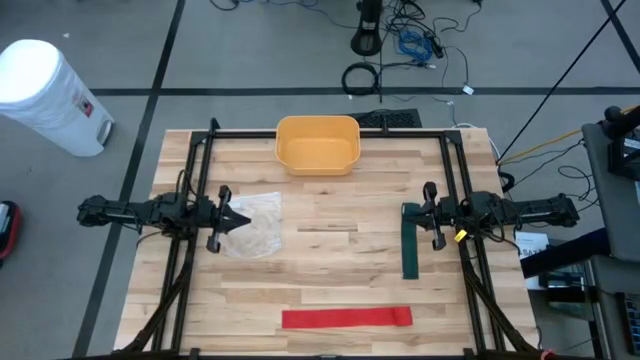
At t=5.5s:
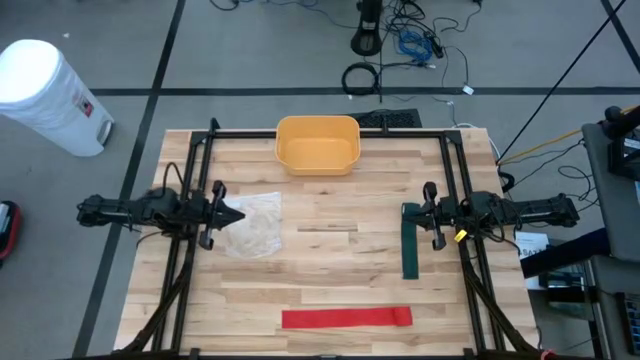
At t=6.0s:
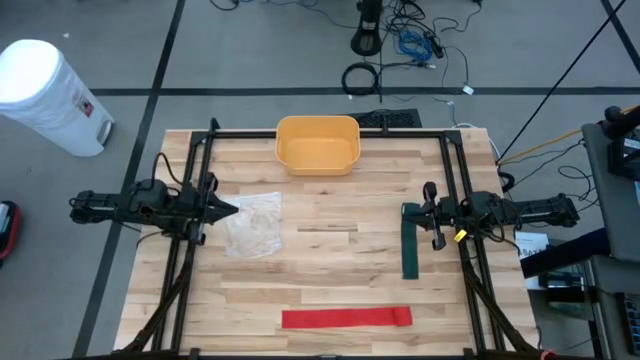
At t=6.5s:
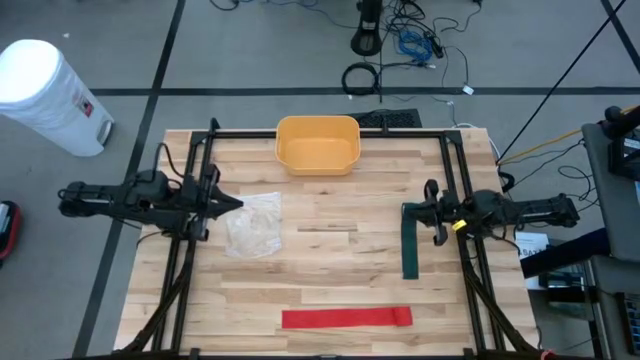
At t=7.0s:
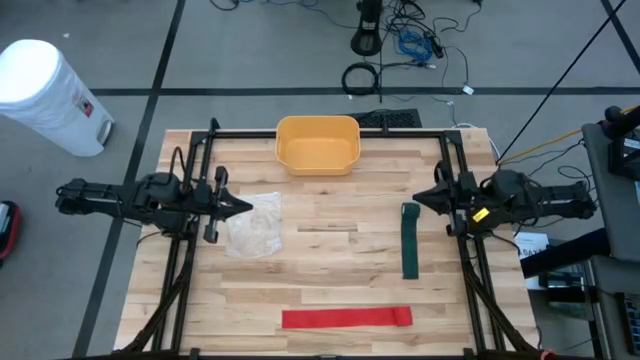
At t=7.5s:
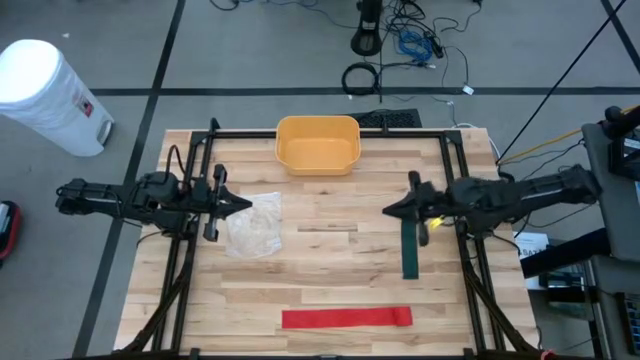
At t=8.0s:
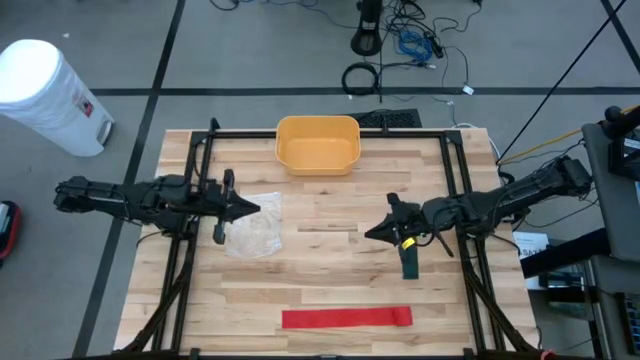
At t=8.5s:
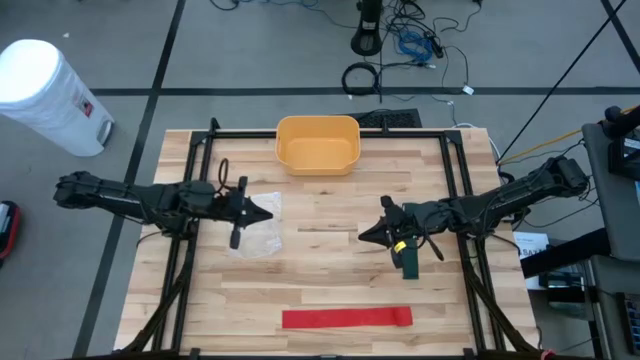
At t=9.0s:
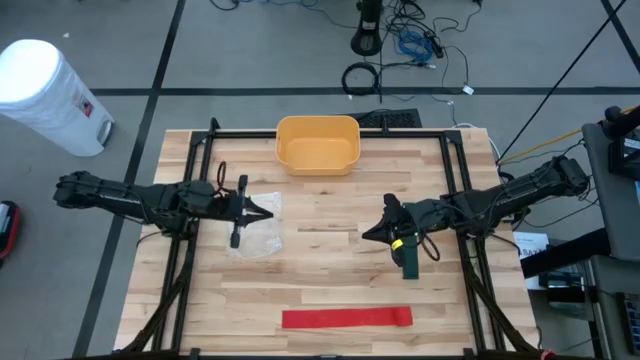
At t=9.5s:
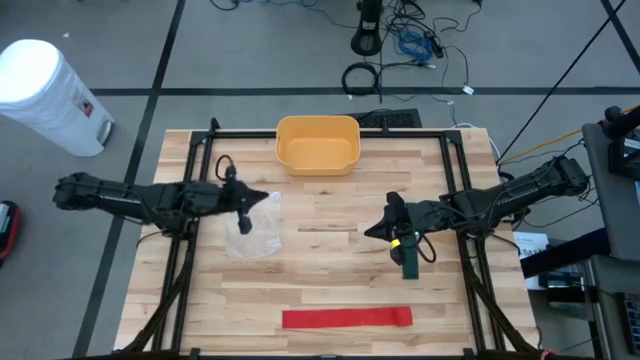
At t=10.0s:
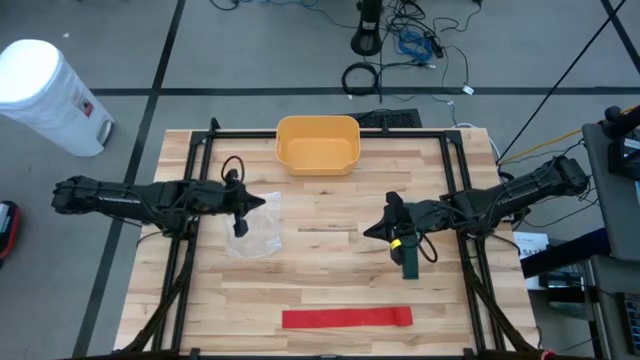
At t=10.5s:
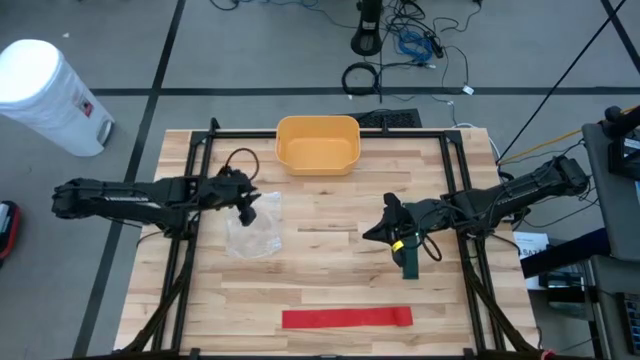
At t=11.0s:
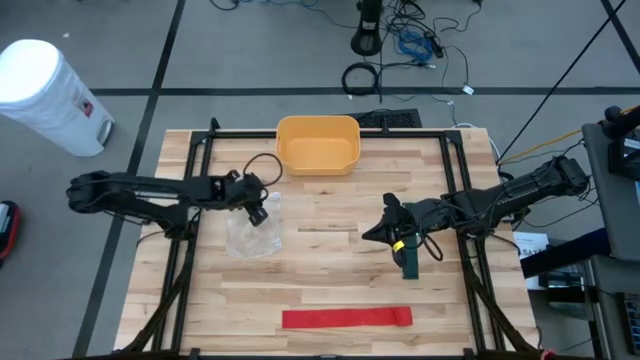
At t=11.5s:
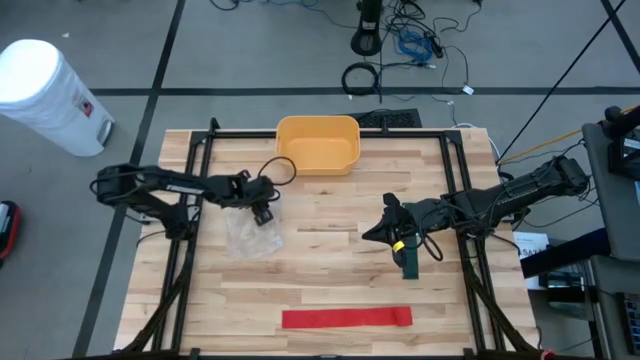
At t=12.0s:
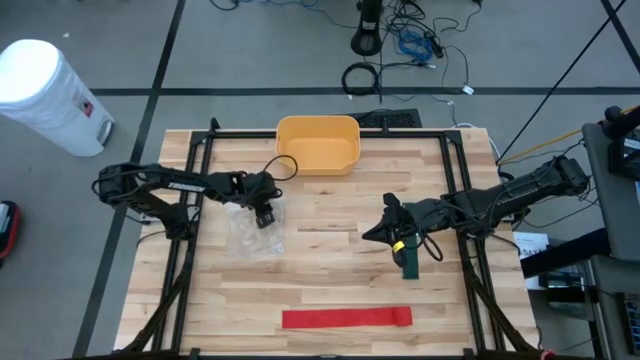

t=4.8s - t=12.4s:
Task: Roll bandage
Adjust the transparent zip bag

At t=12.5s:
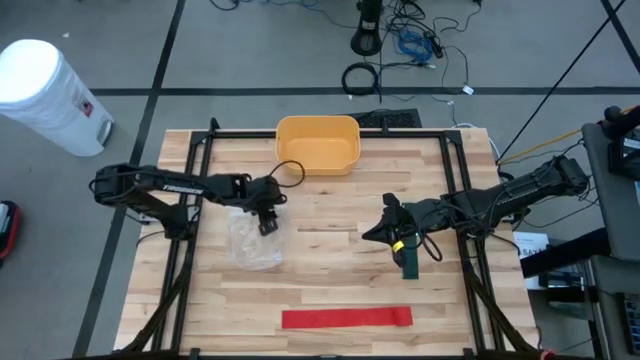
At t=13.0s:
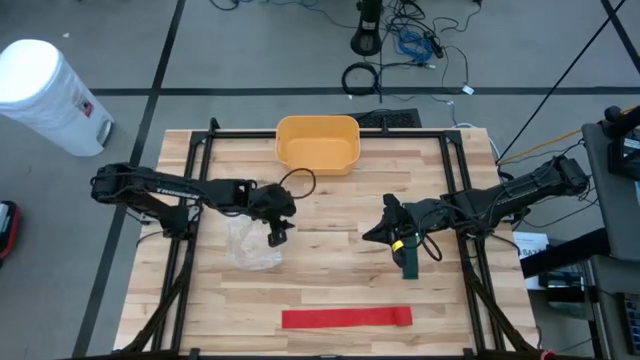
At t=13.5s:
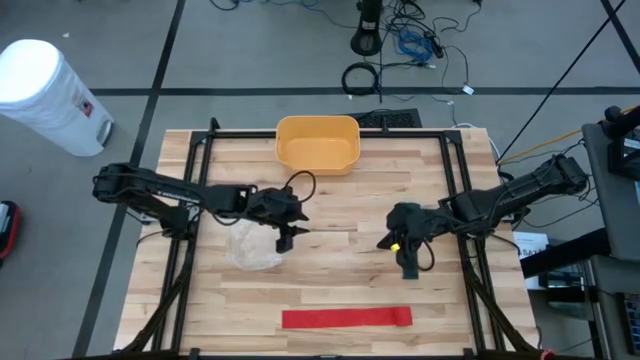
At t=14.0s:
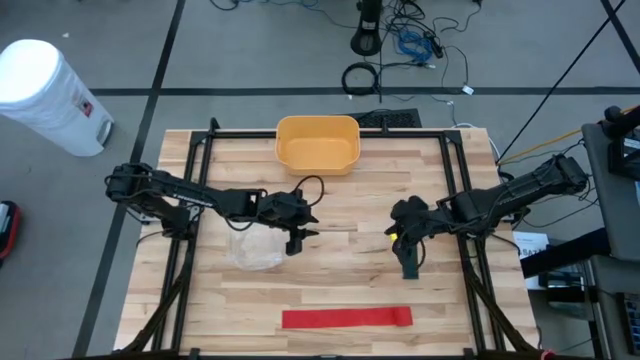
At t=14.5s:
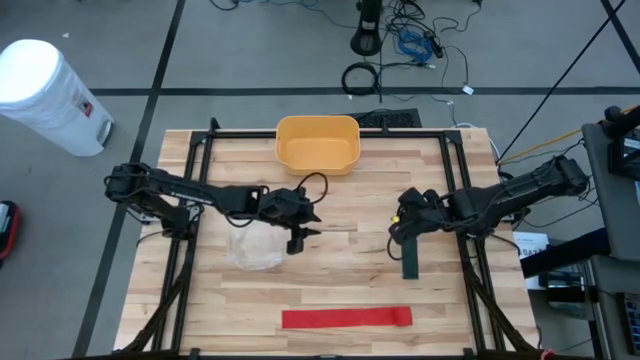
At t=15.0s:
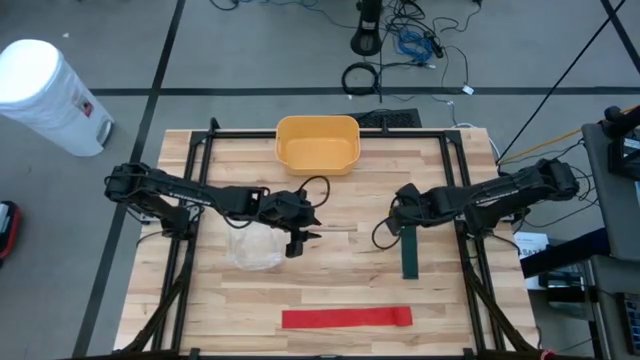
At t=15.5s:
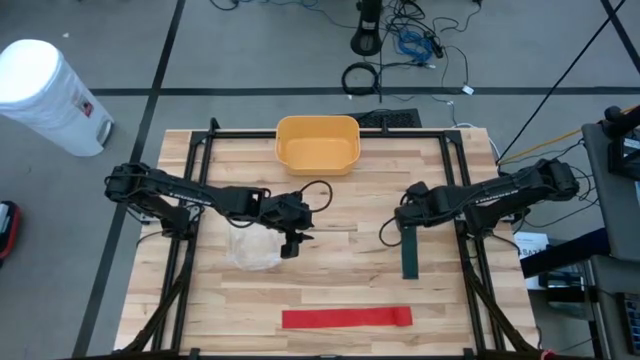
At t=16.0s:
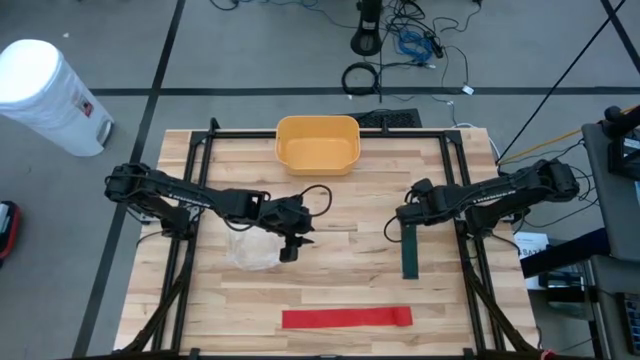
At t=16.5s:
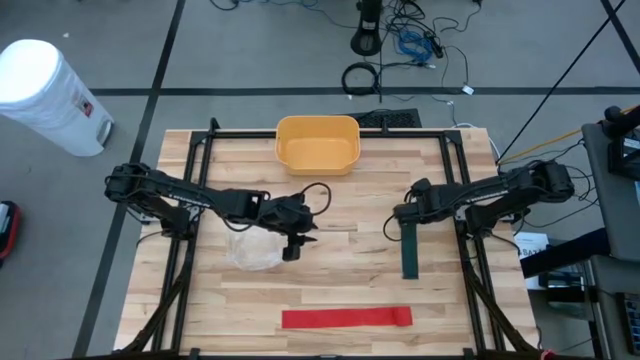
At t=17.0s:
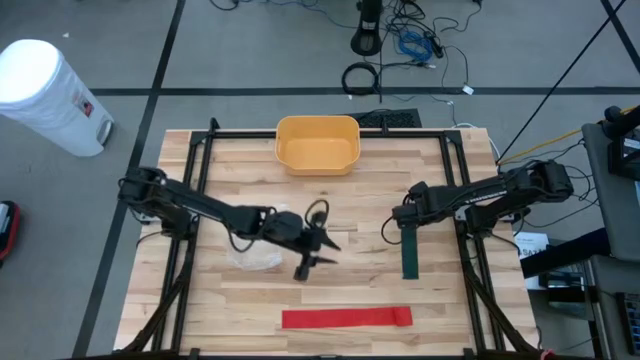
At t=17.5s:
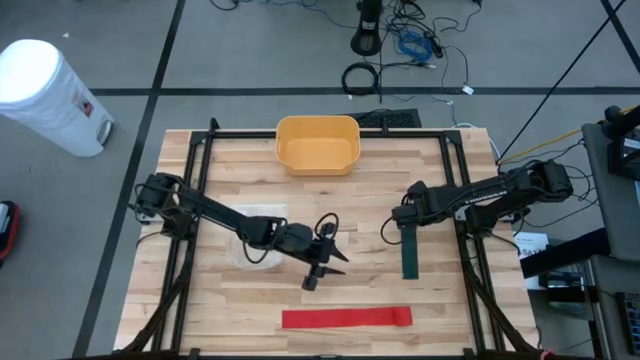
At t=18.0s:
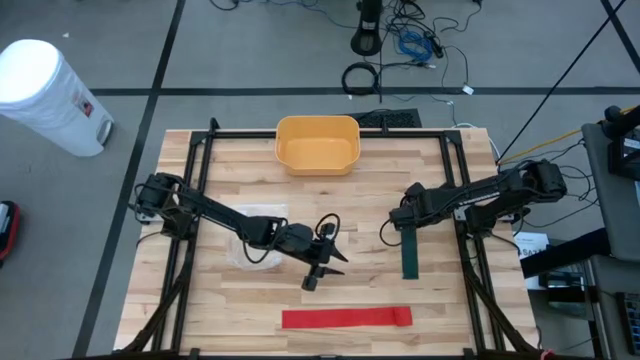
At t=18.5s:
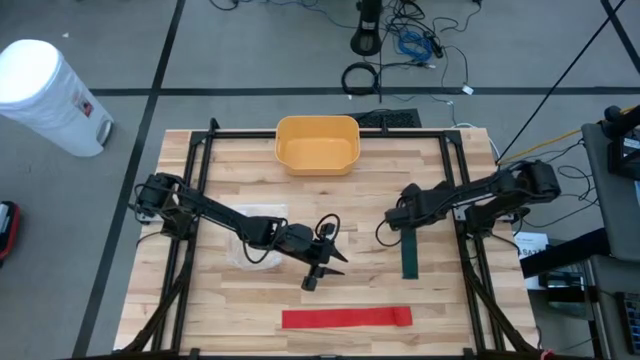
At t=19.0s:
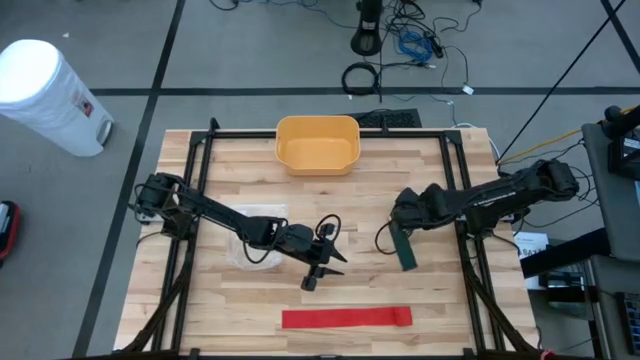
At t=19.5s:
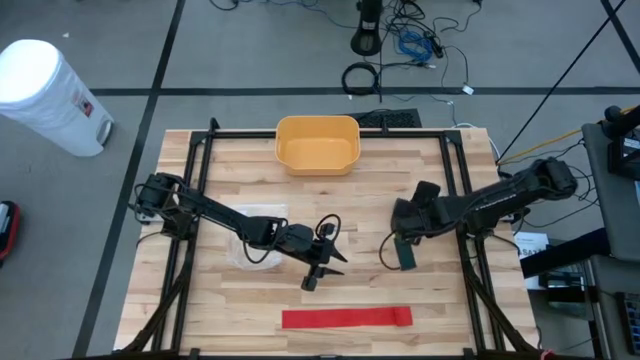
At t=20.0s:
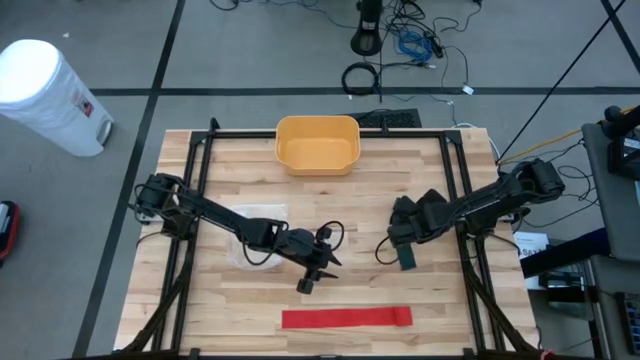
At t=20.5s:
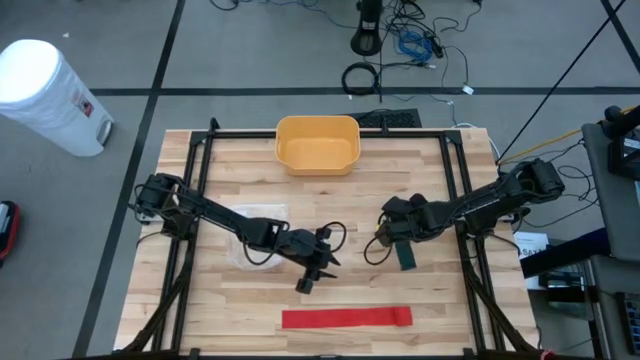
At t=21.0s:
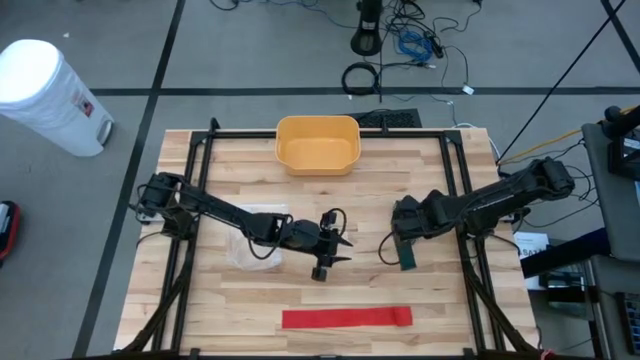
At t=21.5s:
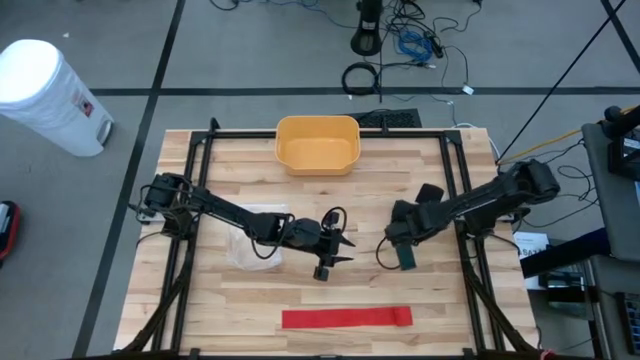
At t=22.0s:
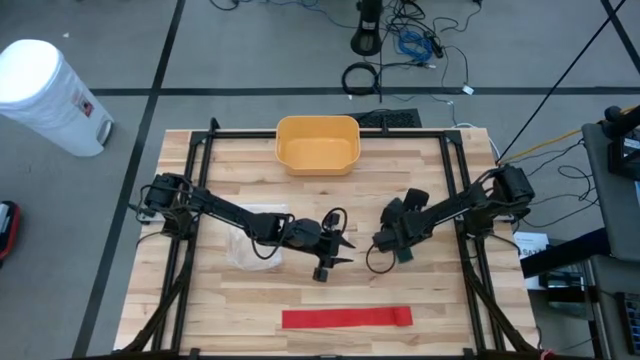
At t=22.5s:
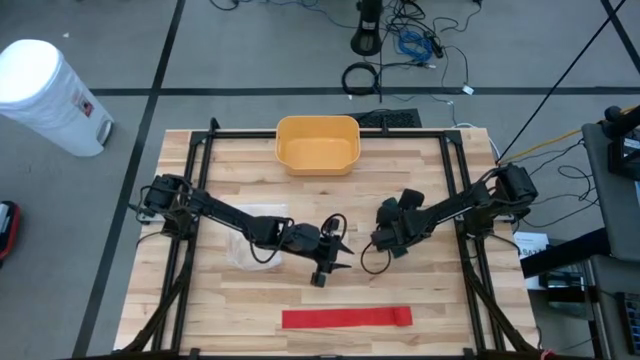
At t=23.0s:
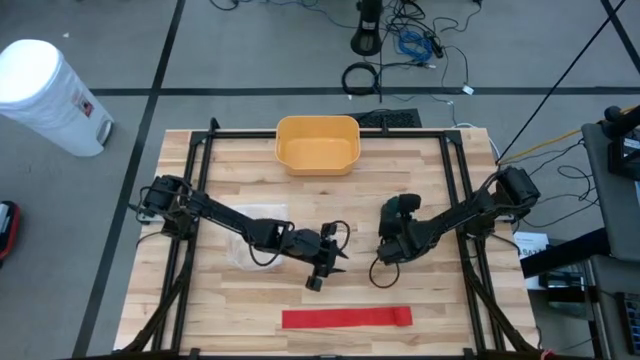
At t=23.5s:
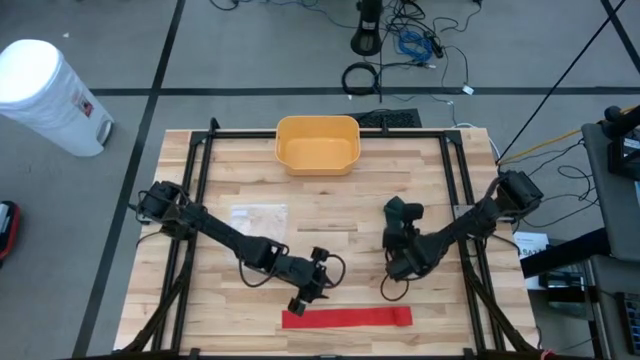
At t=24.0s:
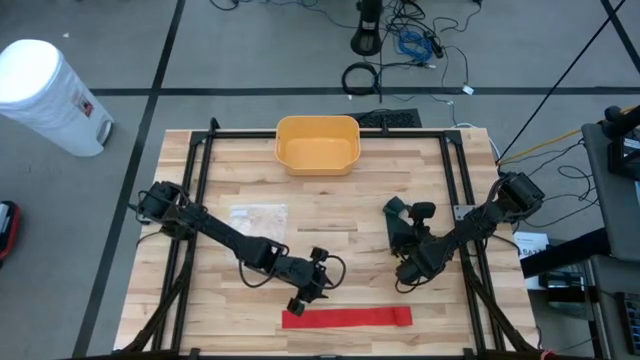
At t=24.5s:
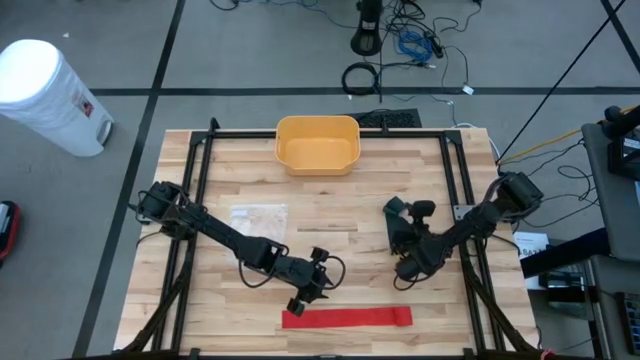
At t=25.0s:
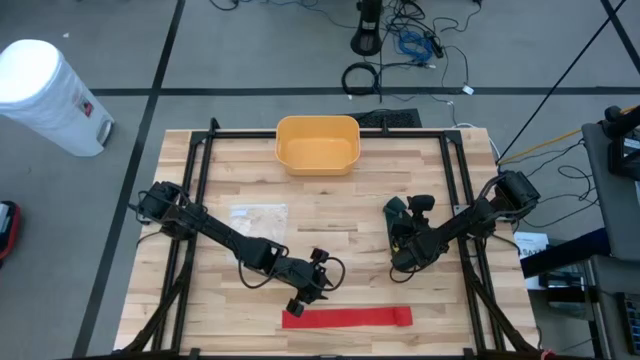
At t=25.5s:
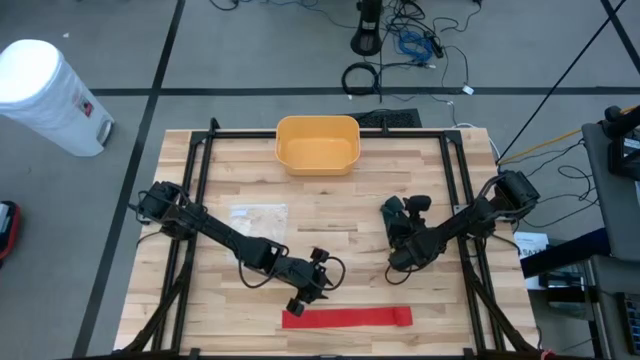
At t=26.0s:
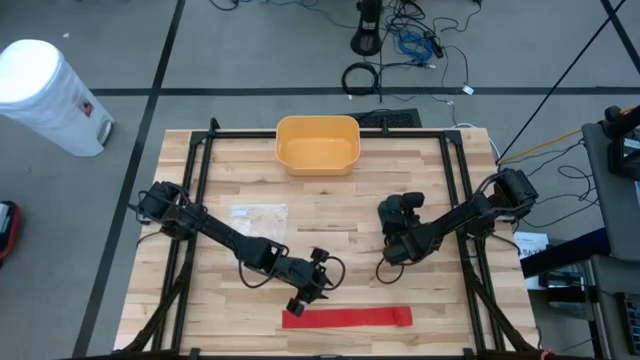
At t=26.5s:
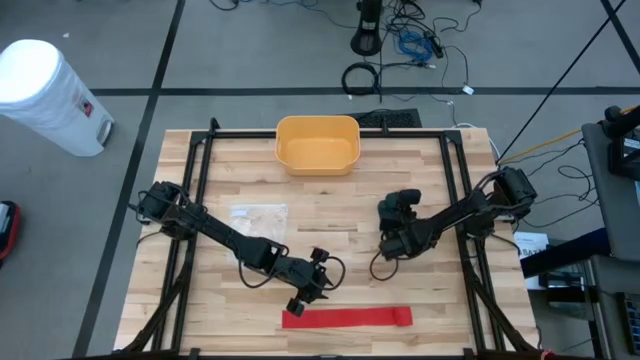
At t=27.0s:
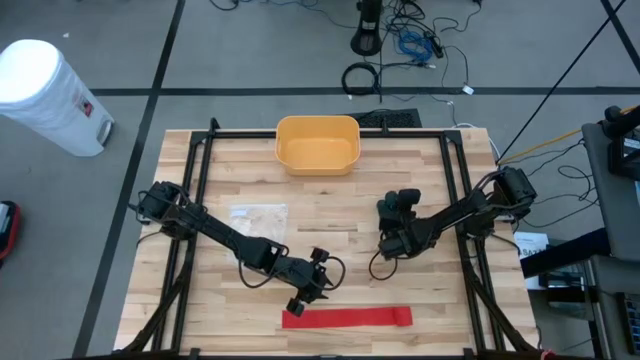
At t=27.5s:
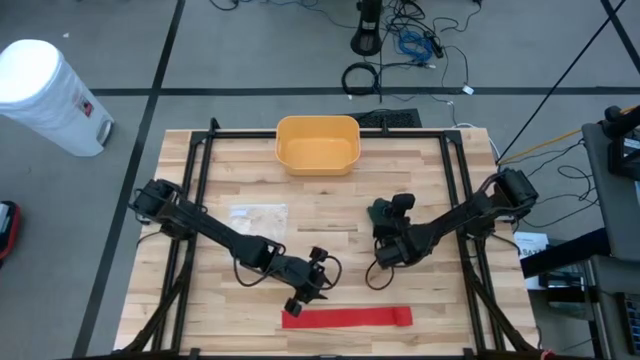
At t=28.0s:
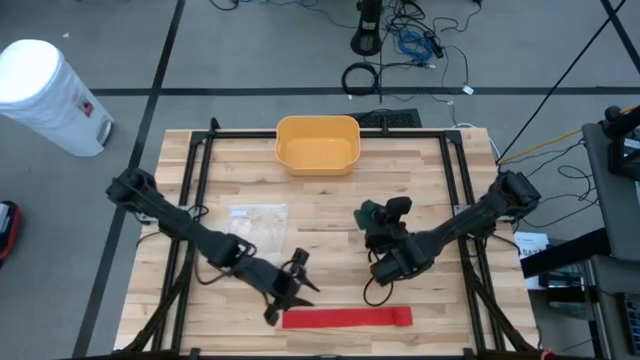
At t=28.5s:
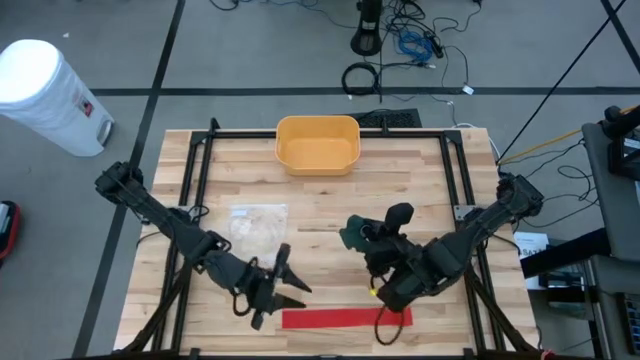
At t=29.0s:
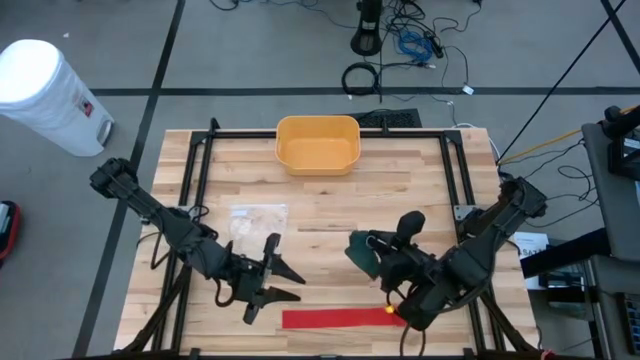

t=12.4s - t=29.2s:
Roll the green bandage
